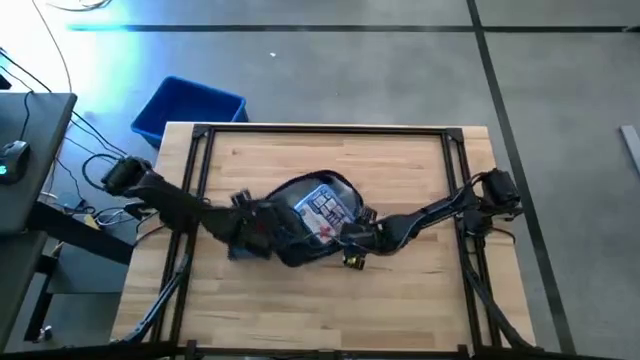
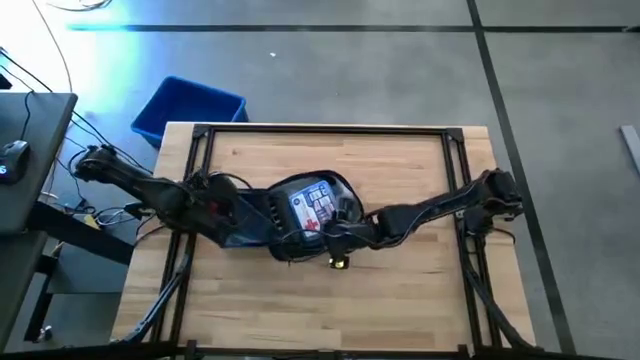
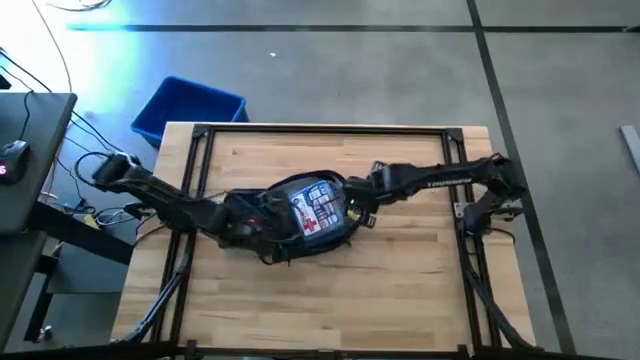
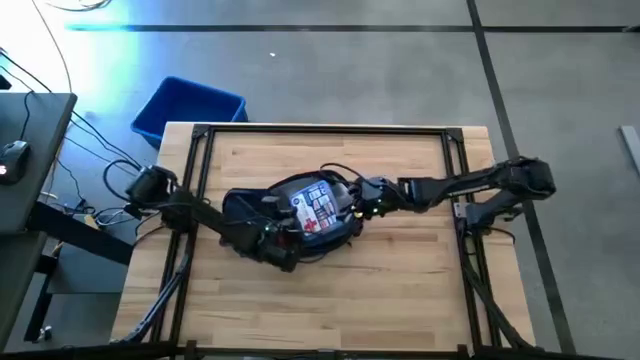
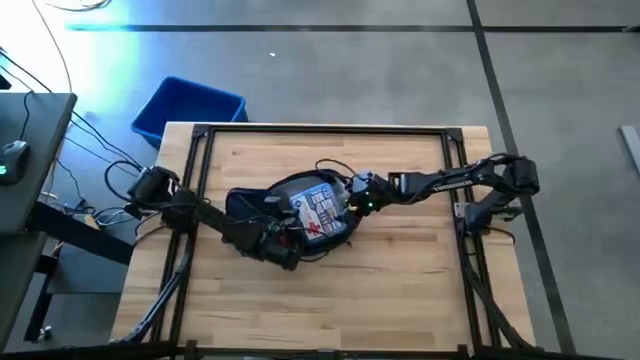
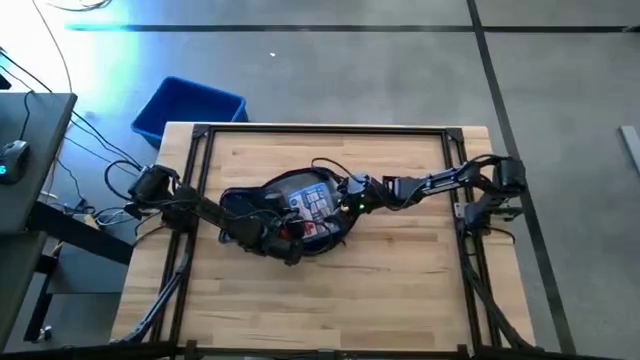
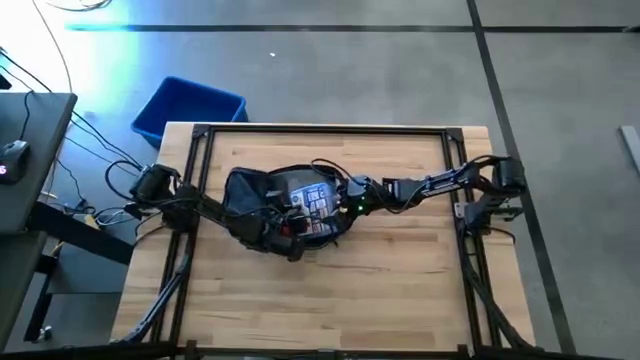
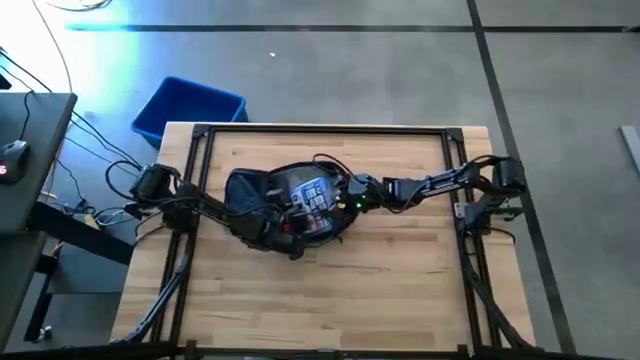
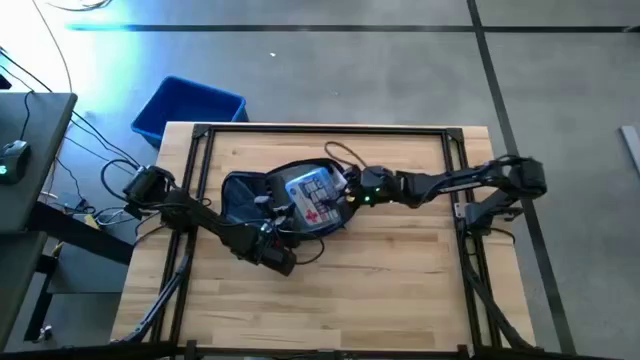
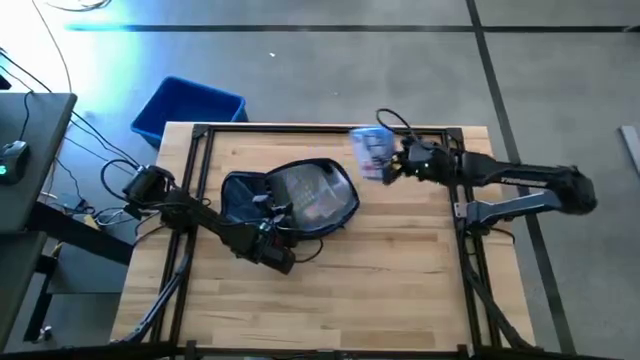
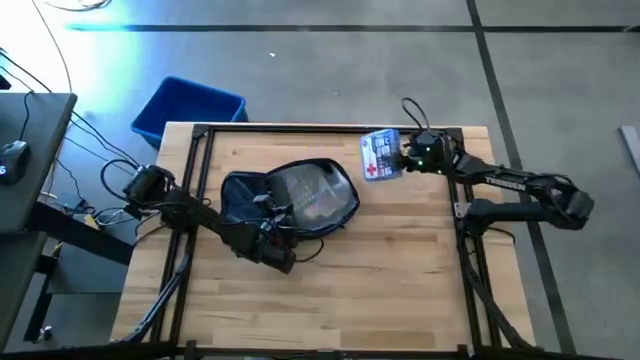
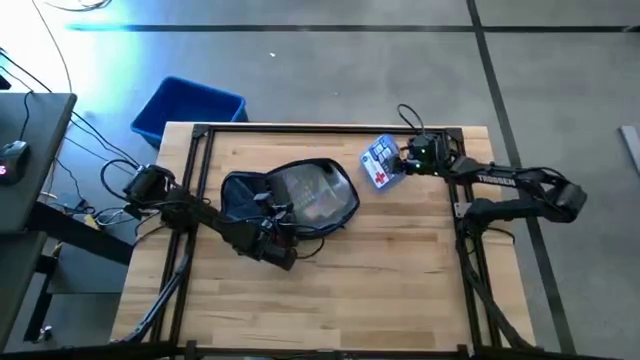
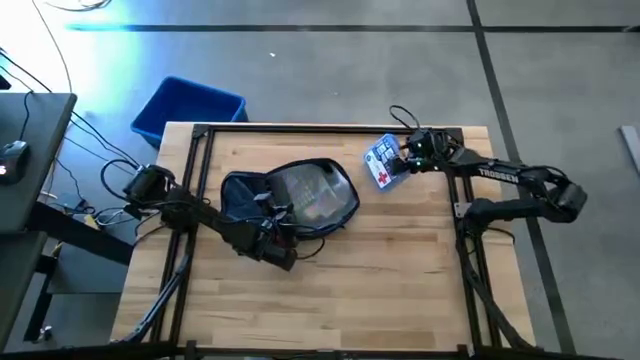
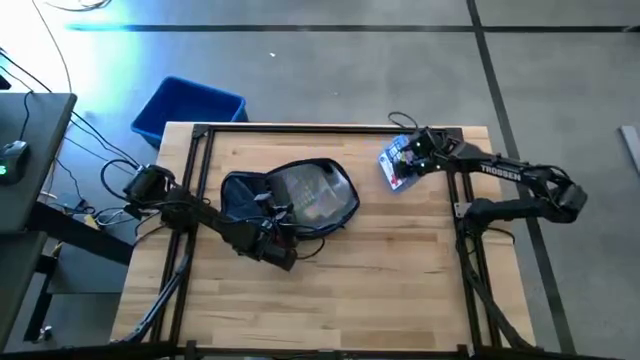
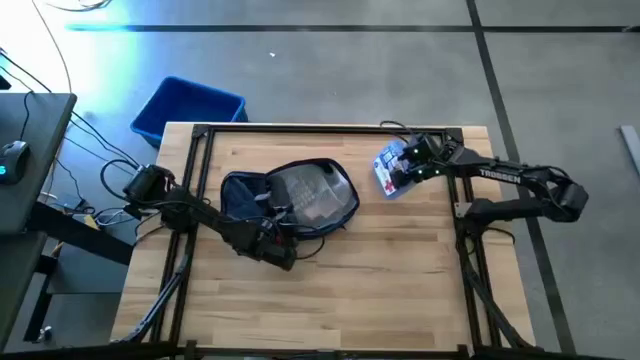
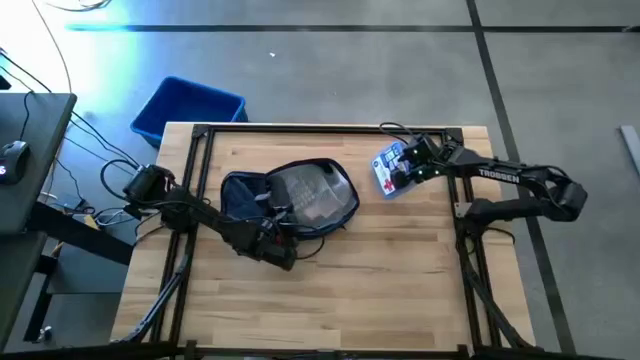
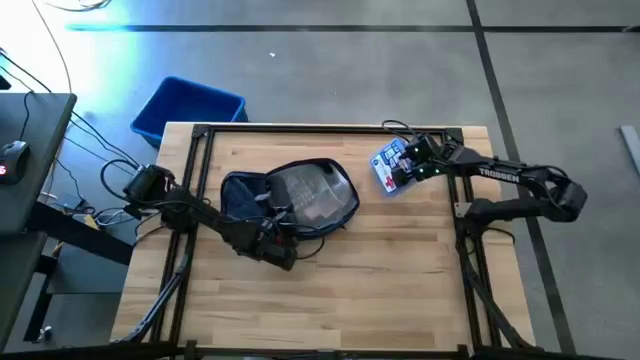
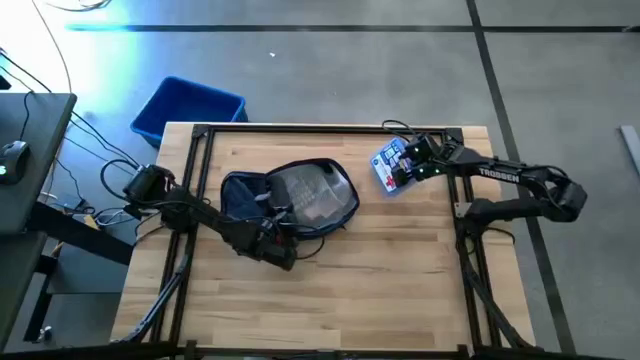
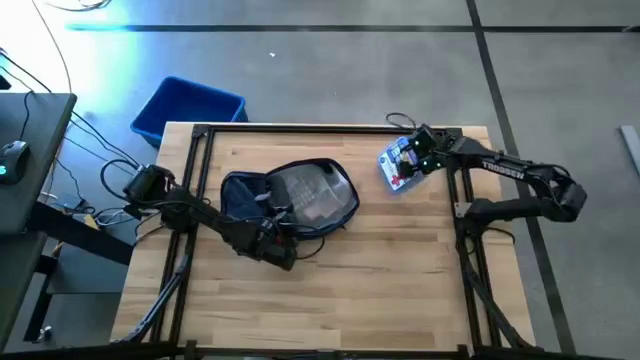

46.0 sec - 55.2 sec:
Task: Unpack backpack
Remove the blue medicine kit from the backpack

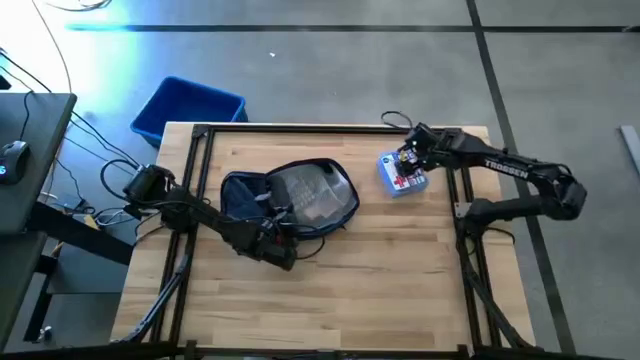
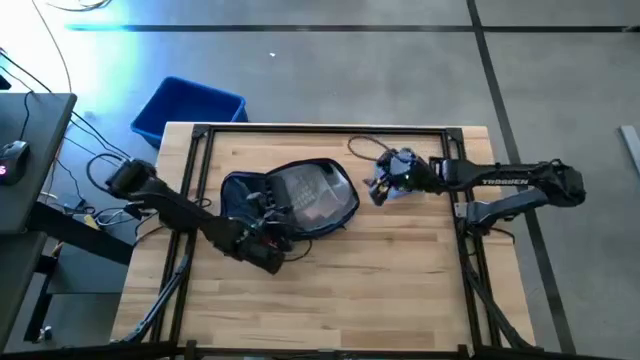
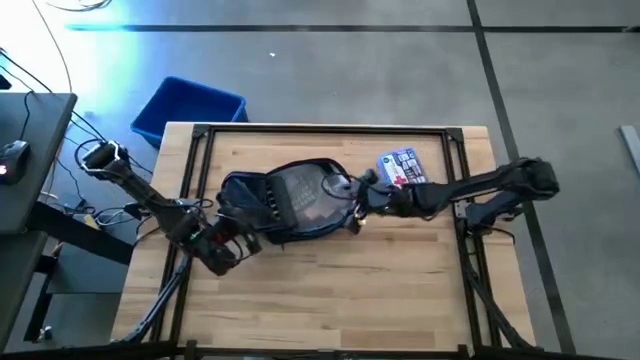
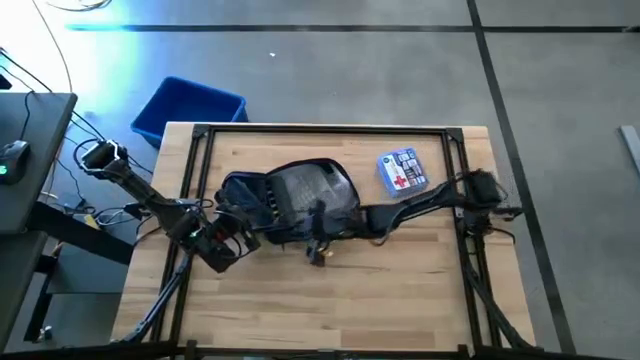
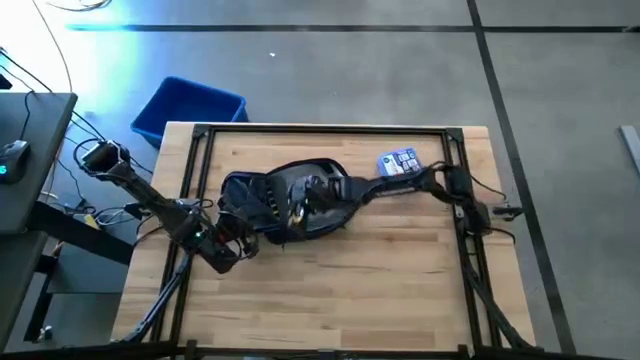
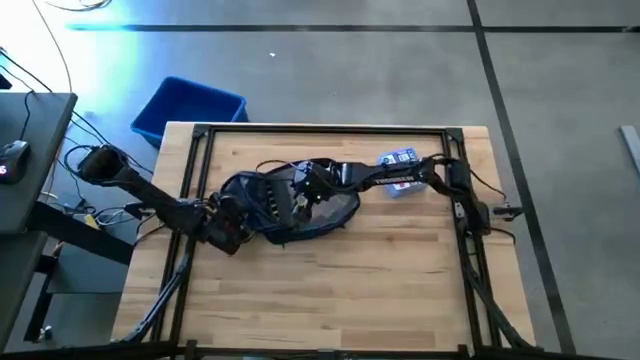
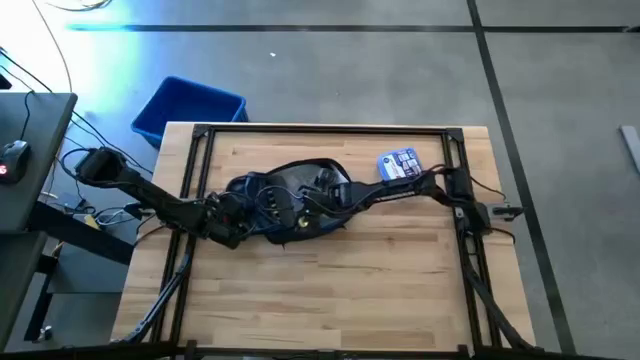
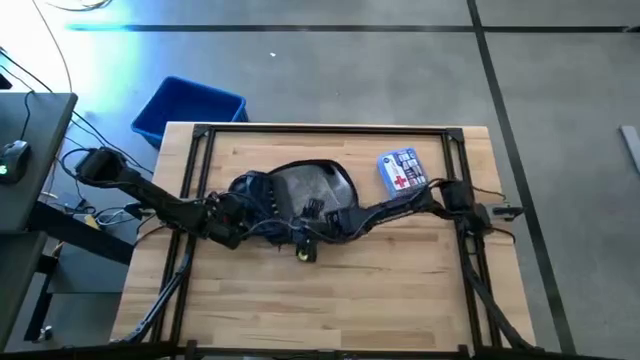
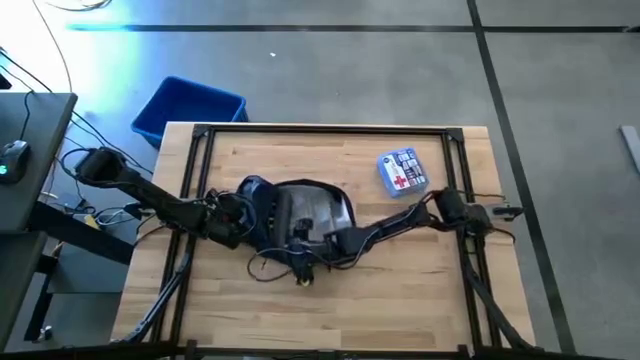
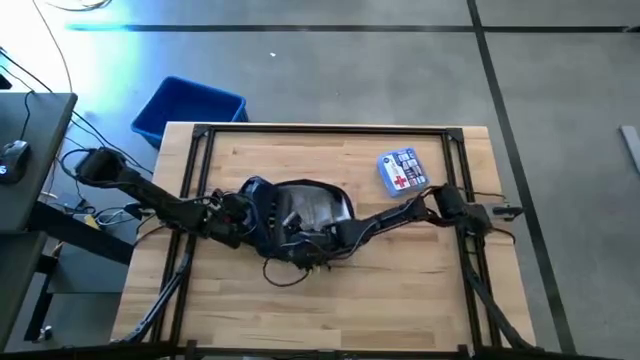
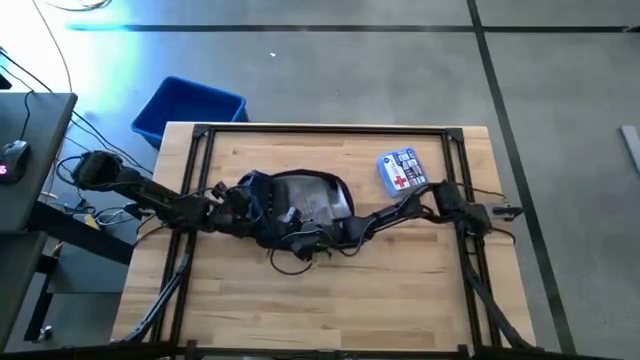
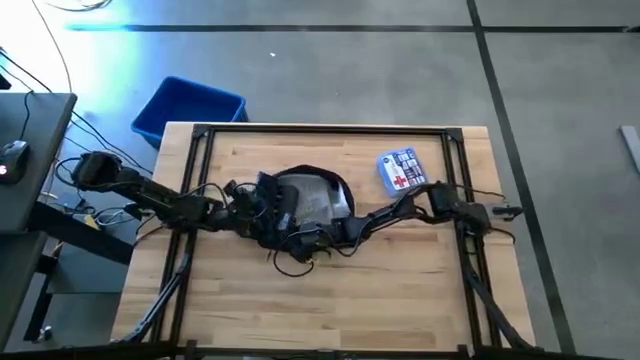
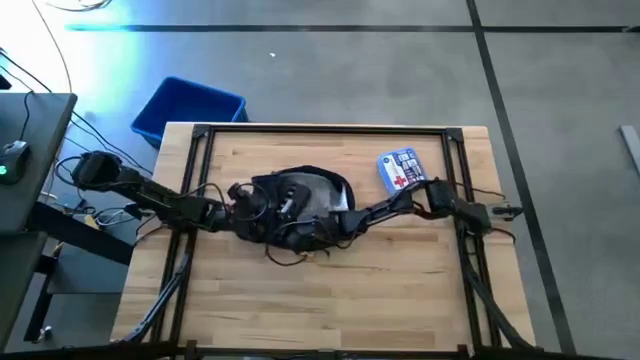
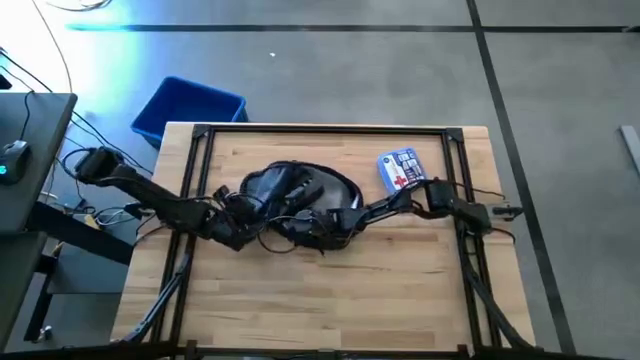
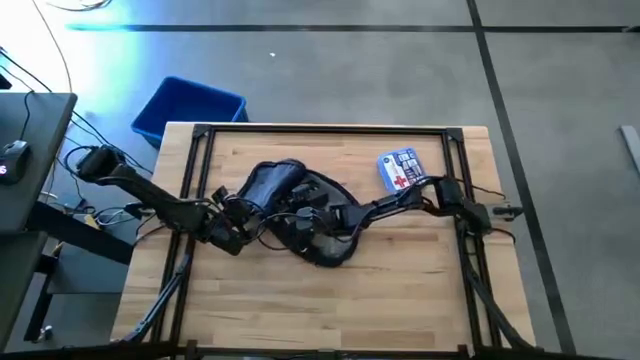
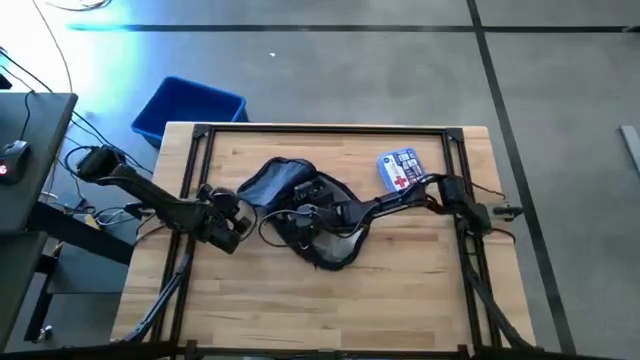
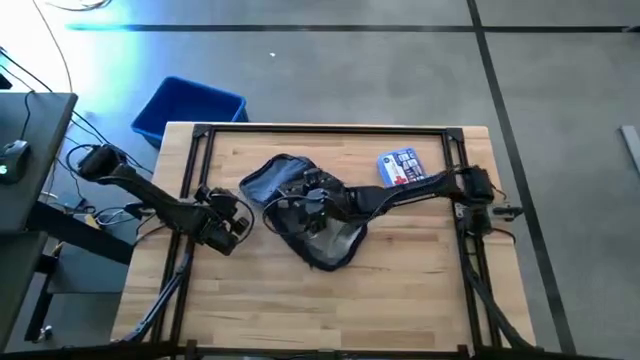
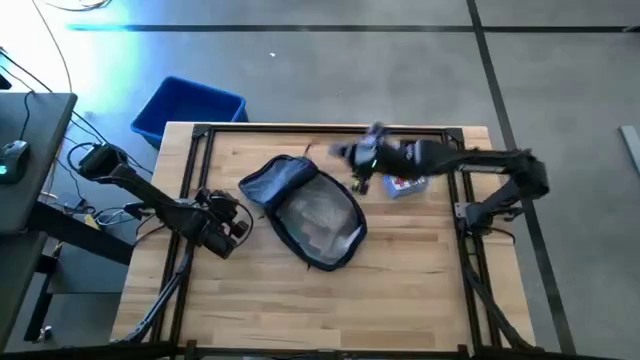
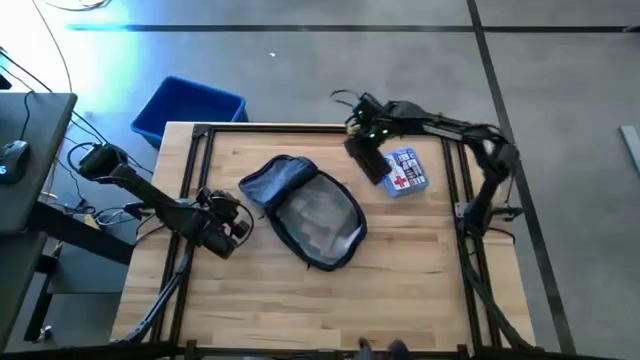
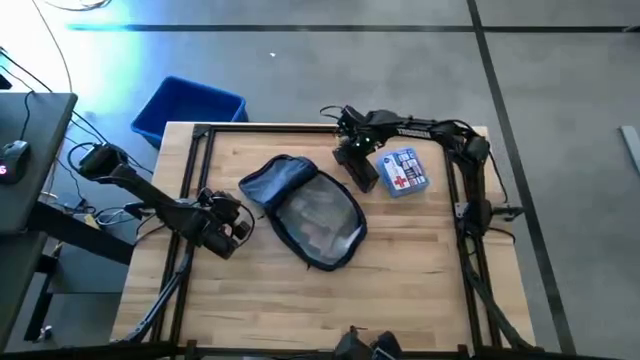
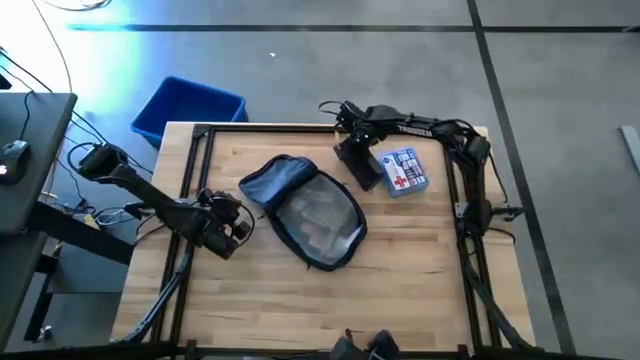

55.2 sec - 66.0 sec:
Remove the black pill organizer from the backpack

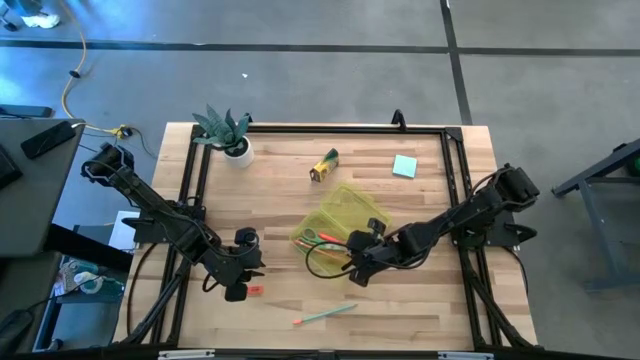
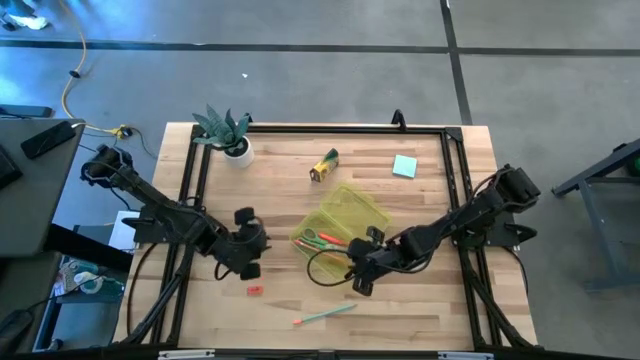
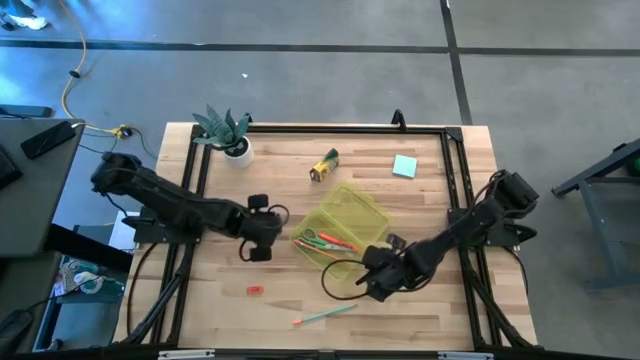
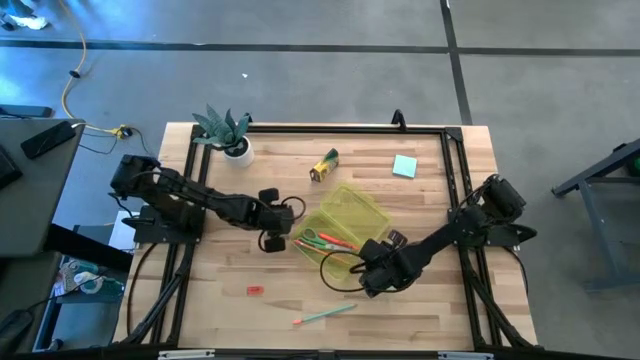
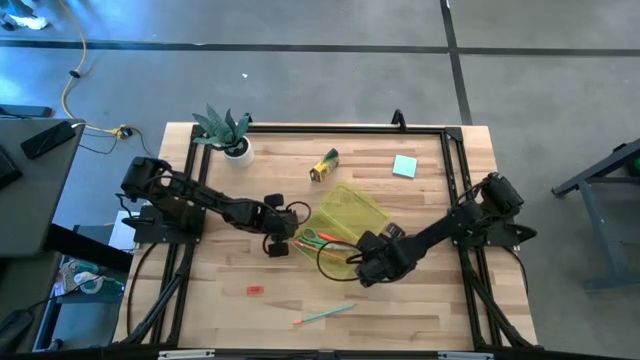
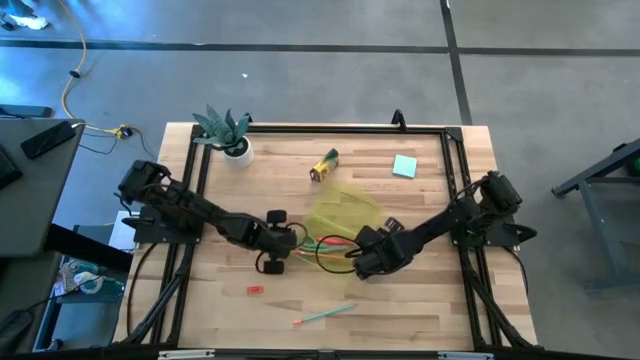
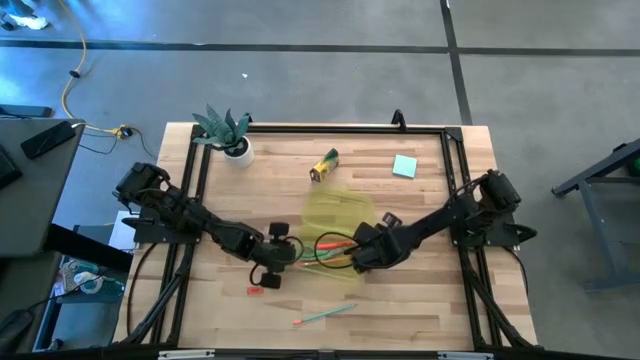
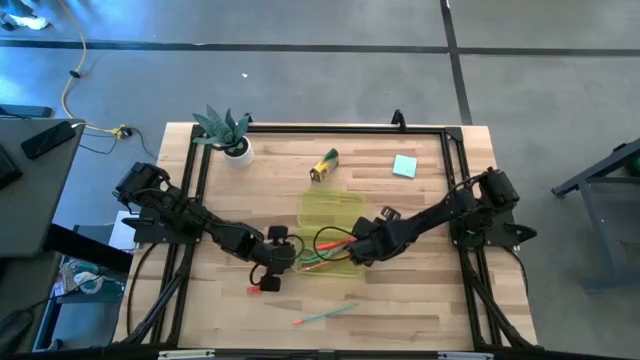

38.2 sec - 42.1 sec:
Task: Pack school essentials
Adjust the yellow box
